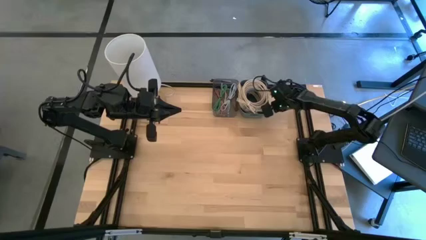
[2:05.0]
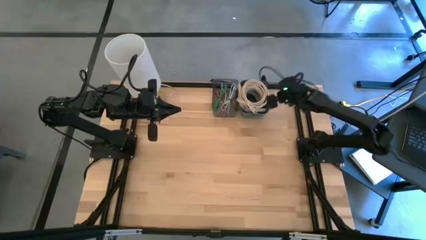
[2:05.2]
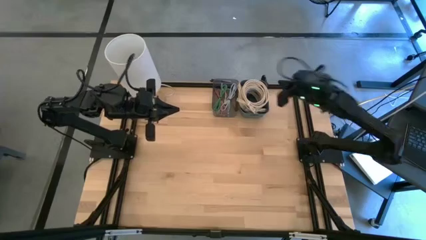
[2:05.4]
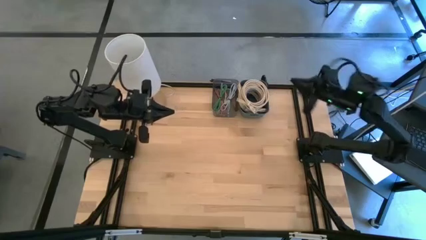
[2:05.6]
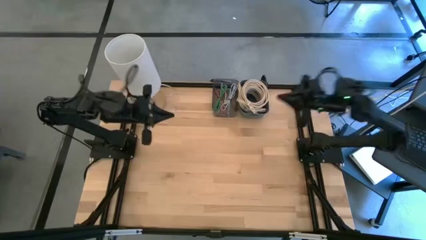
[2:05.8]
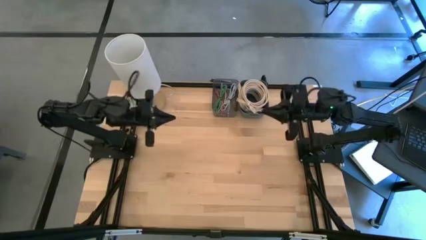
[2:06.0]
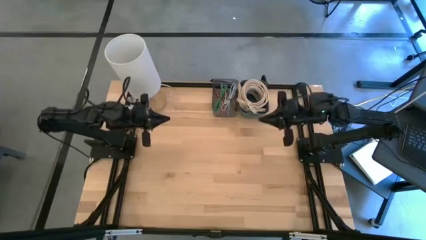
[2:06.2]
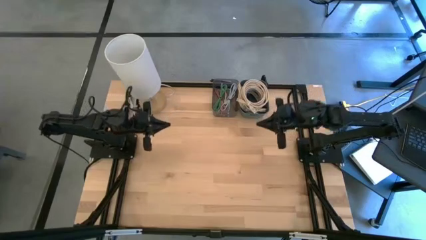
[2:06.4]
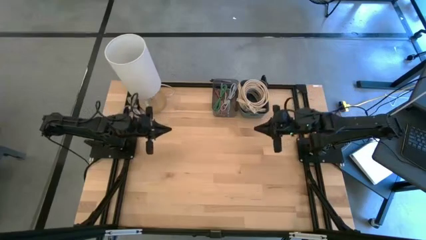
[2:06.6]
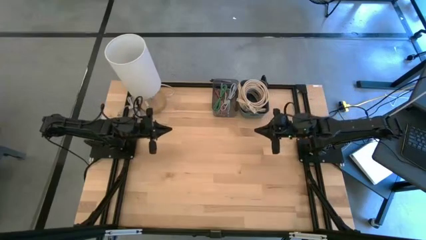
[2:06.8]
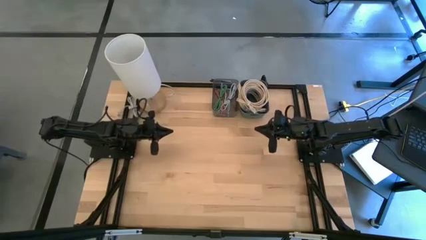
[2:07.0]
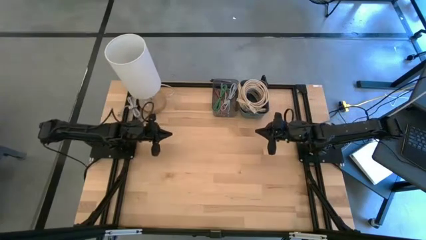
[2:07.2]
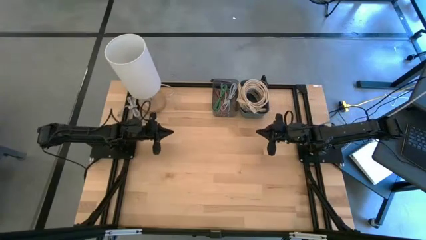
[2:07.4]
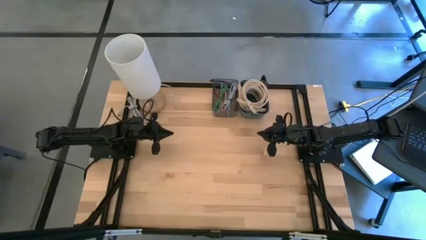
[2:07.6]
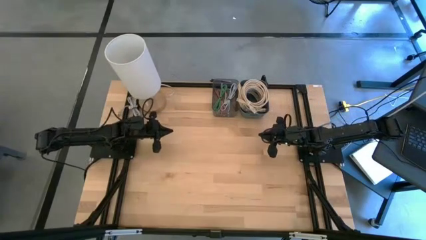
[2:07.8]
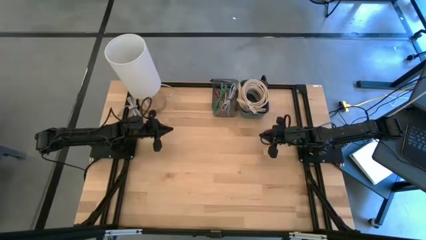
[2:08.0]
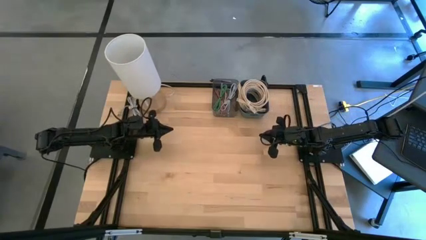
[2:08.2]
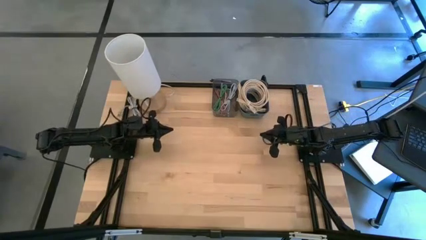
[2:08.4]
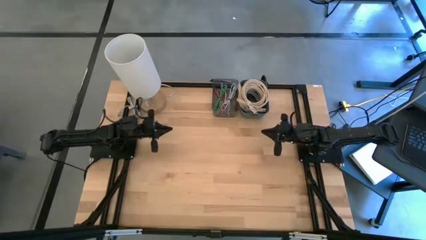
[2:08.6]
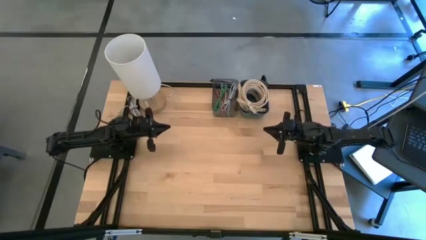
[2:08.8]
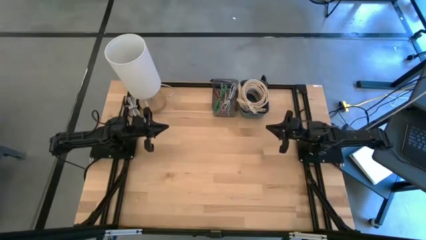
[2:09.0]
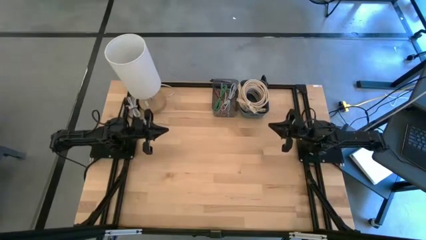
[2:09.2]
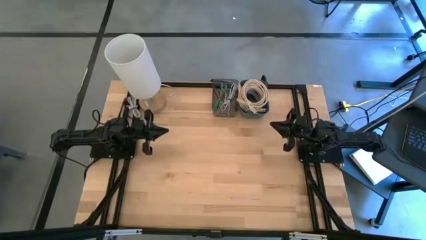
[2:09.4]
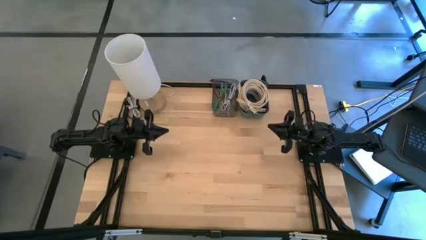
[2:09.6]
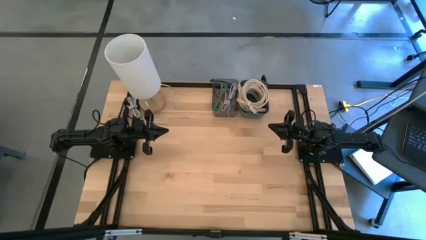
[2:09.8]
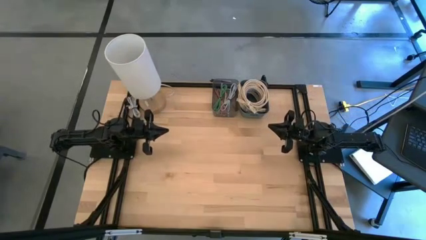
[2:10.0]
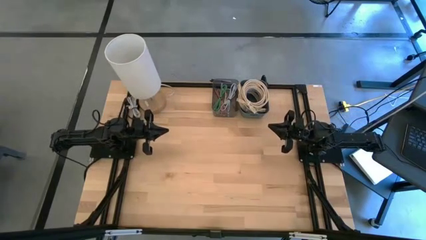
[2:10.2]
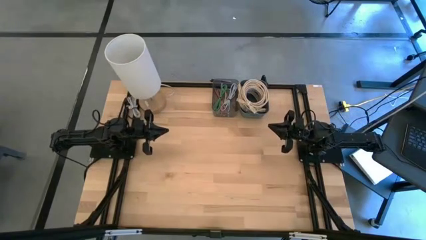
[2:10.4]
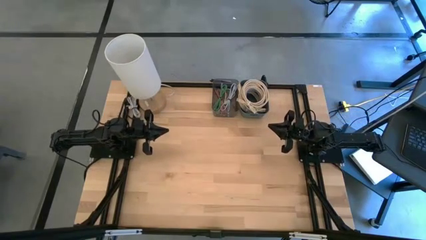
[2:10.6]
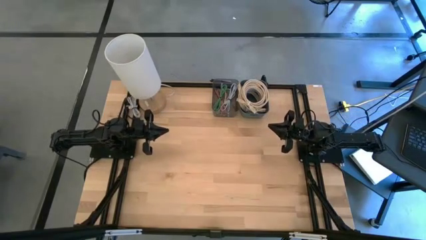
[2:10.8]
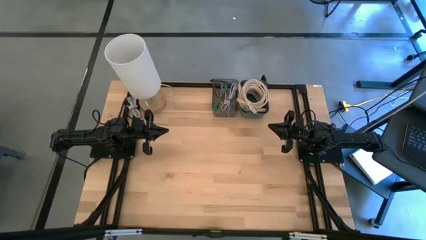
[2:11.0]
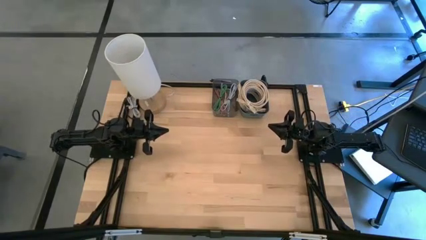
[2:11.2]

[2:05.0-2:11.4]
Return to Home Position

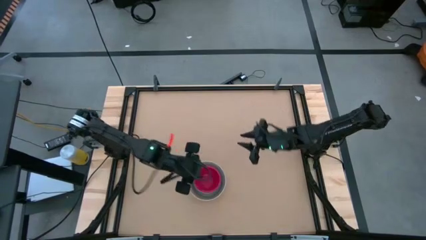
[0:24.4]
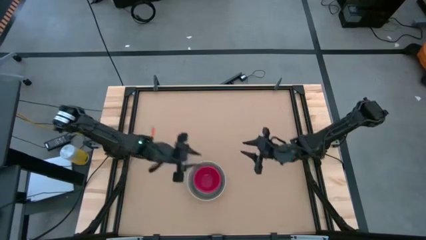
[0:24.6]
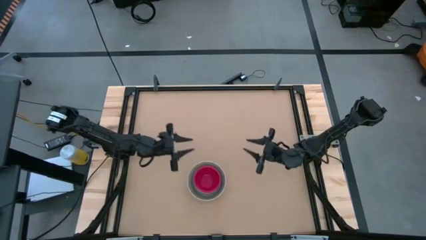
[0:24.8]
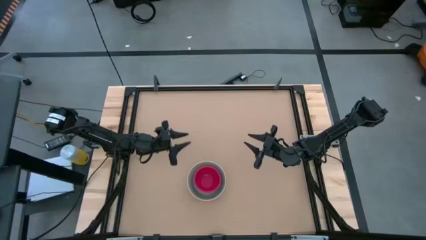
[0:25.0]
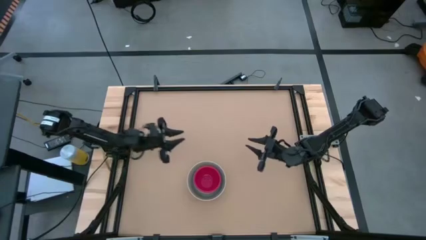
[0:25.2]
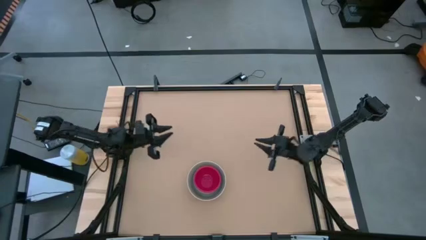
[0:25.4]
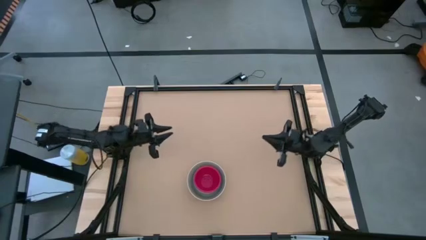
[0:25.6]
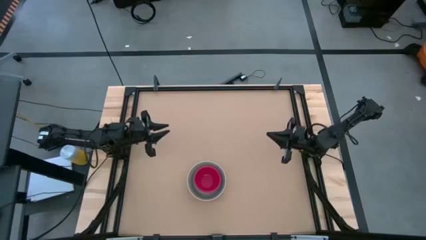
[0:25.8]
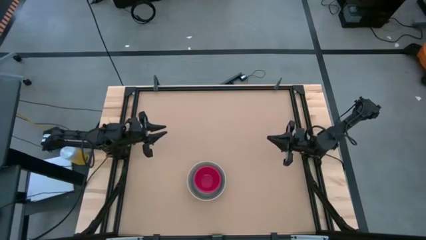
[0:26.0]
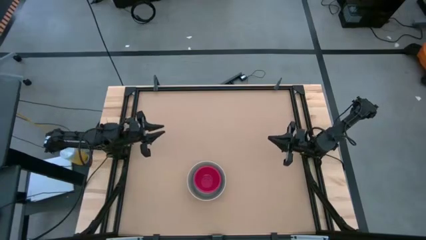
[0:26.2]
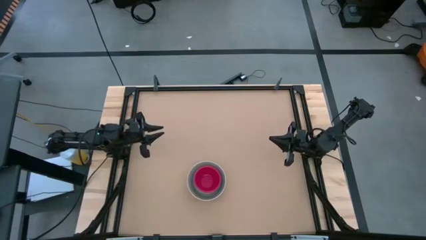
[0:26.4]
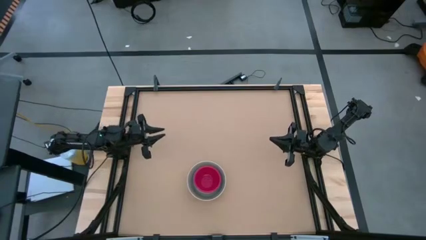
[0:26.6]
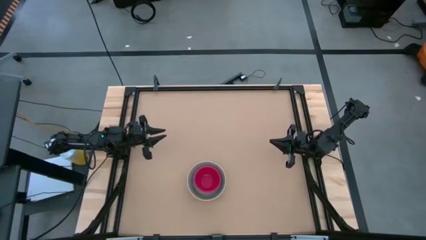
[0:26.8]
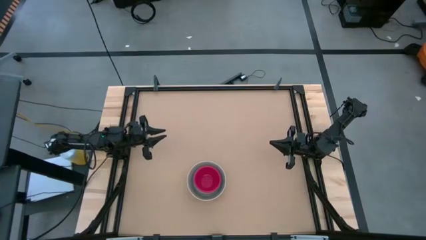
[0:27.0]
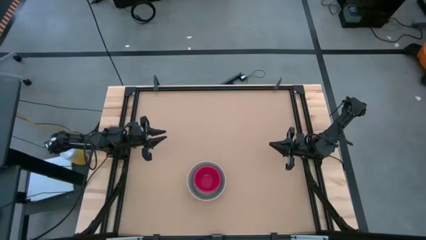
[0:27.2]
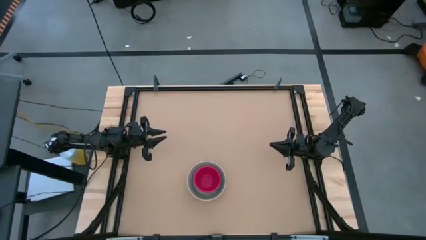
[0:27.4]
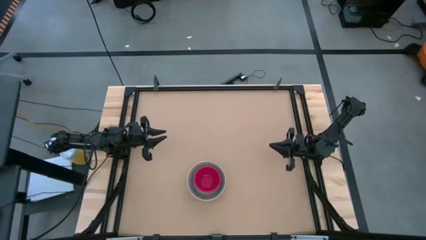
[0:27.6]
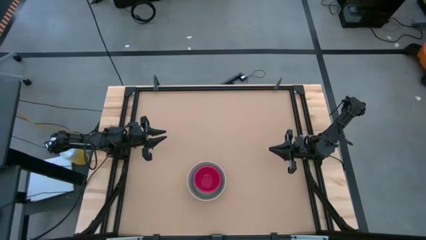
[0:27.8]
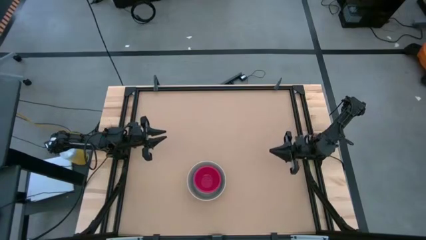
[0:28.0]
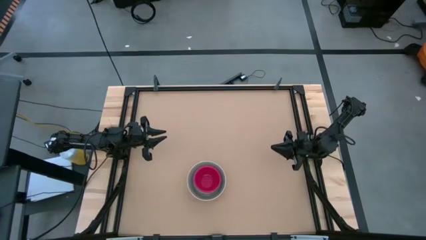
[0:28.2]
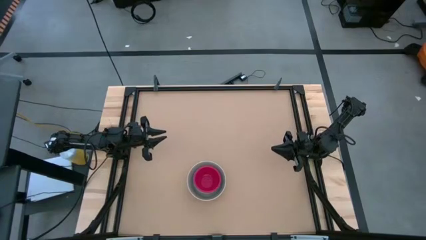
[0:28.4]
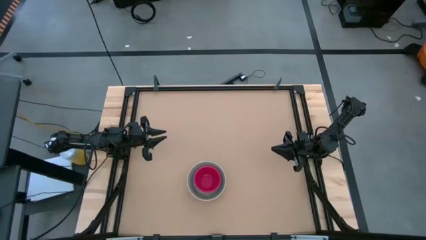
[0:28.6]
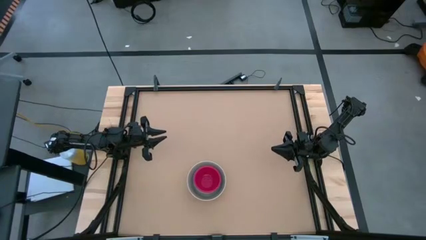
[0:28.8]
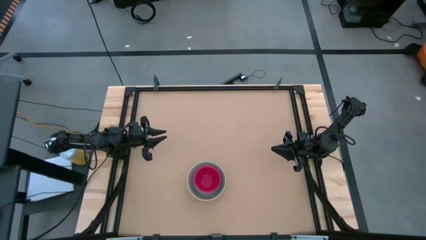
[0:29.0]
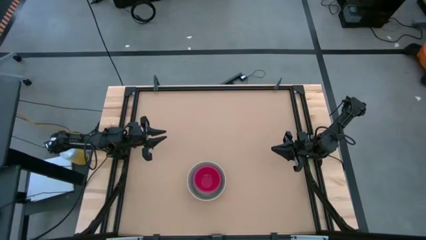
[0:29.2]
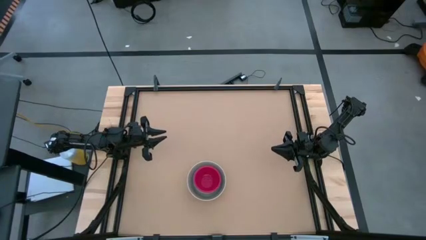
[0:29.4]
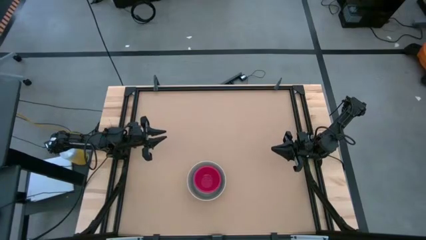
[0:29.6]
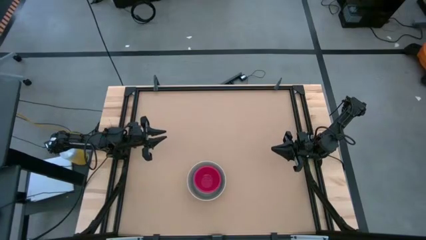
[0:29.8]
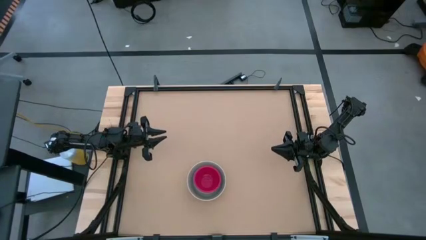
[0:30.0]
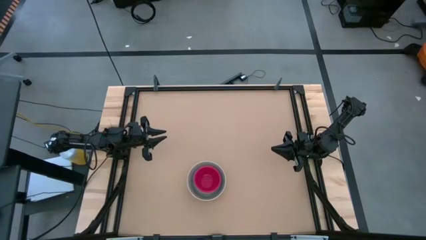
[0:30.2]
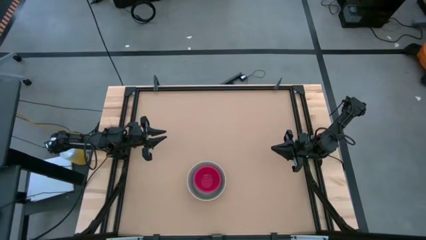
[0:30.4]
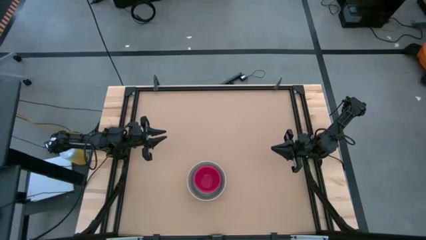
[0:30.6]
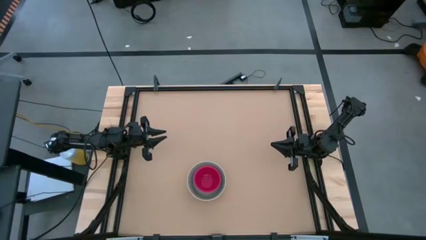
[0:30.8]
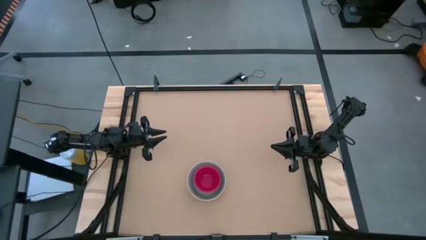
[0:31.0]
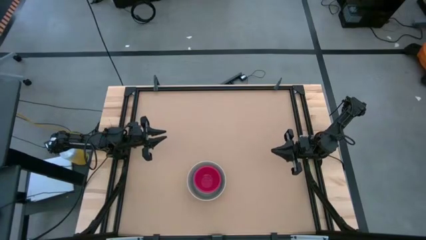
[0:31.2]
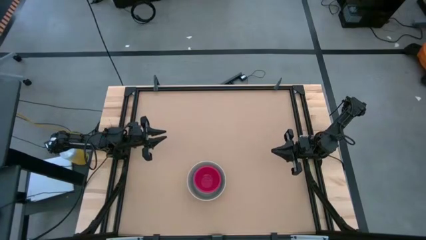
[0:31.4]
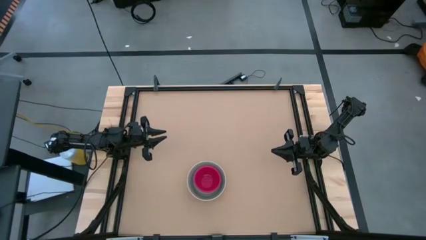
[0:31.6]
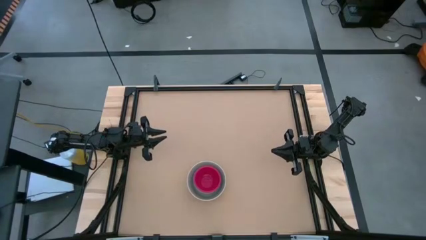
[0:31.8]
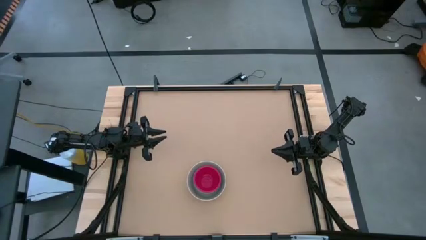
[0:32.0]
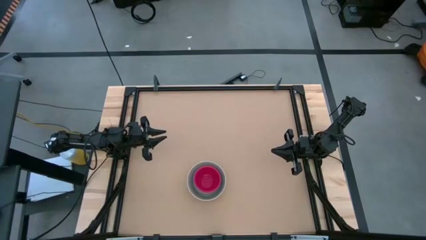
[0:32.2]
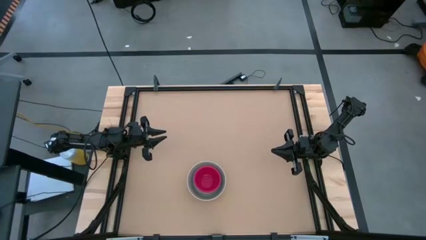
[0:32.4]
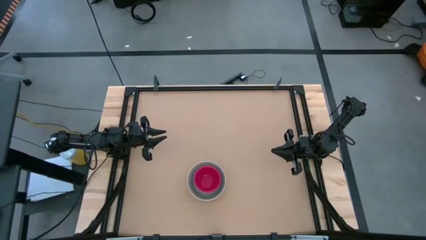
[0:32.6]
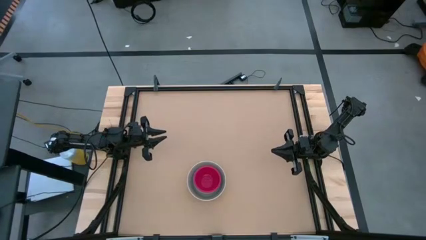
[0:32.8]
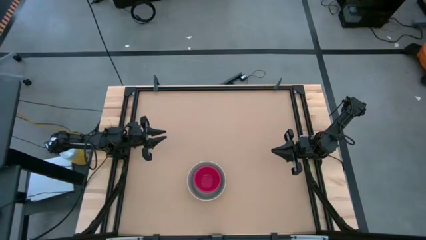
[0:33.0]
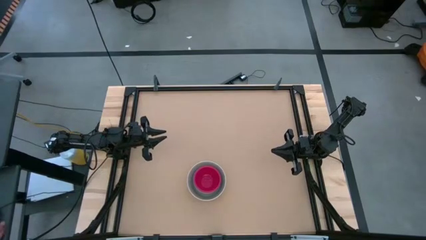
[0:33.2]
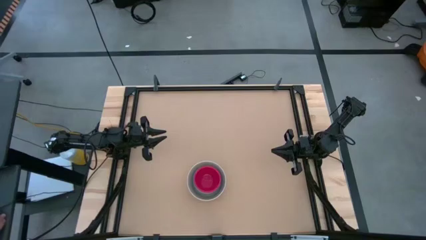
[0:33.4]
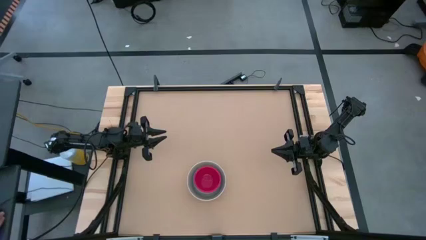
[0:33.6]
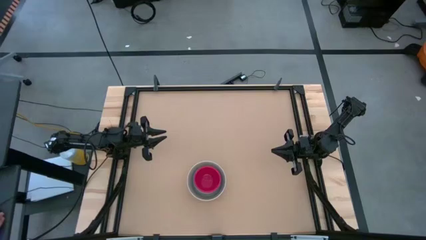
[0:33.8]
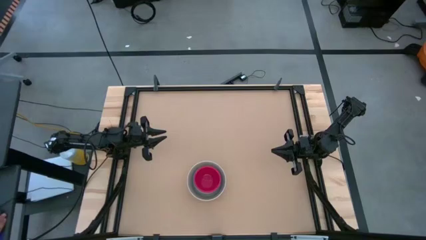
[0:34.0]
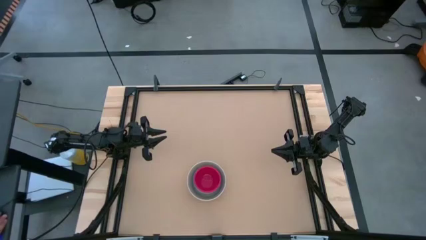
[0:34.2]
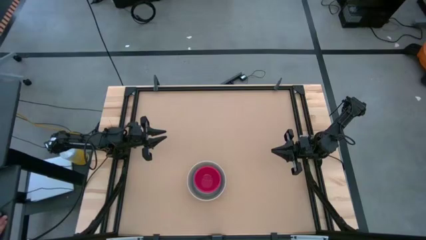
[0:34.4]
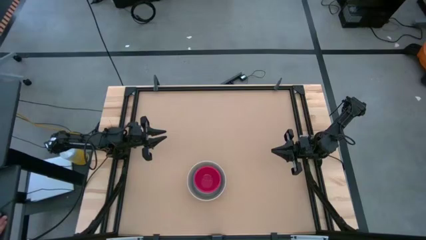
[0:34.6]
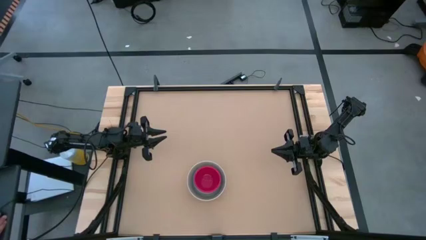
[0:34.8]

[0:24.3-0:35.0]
Return to Home Position
